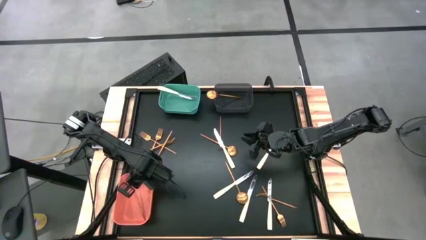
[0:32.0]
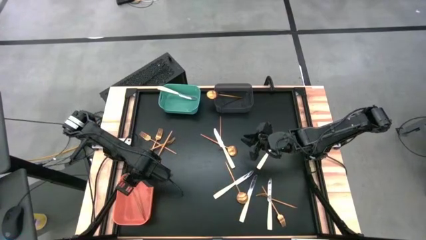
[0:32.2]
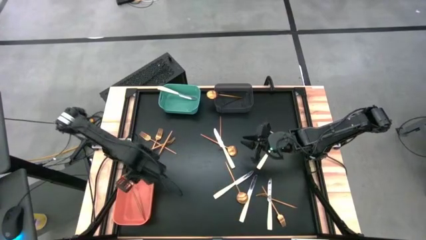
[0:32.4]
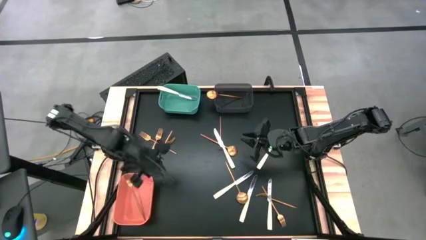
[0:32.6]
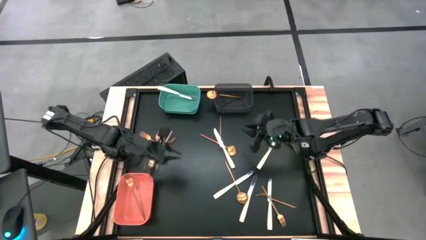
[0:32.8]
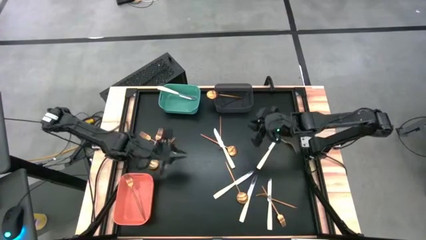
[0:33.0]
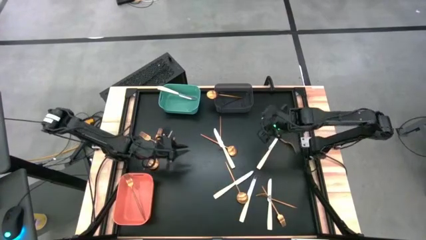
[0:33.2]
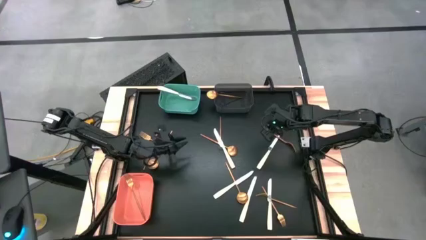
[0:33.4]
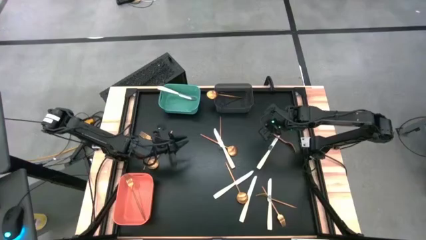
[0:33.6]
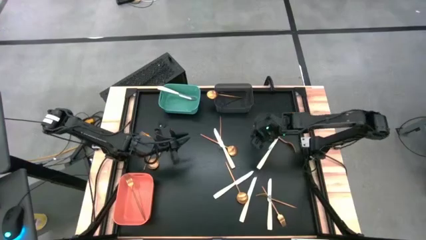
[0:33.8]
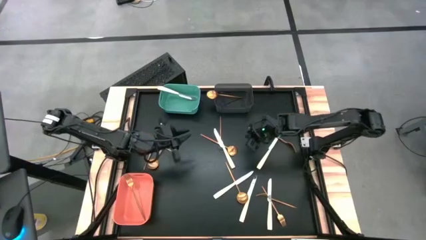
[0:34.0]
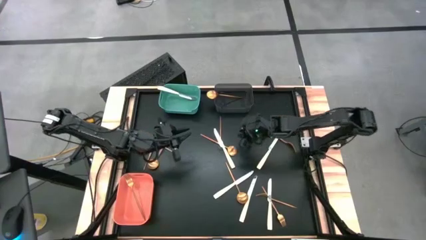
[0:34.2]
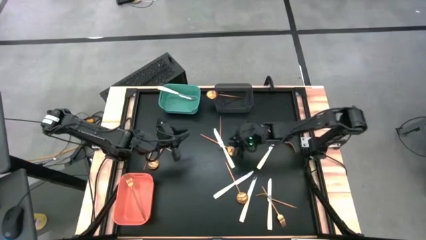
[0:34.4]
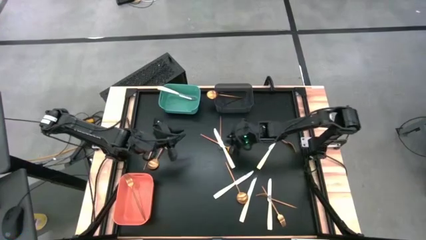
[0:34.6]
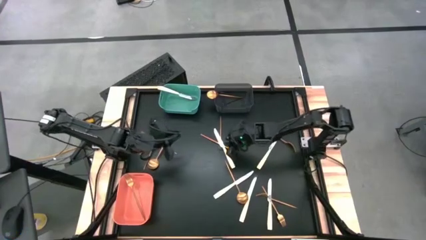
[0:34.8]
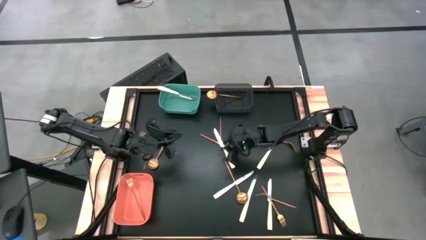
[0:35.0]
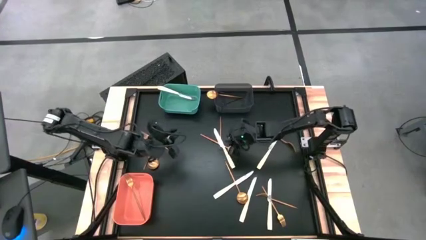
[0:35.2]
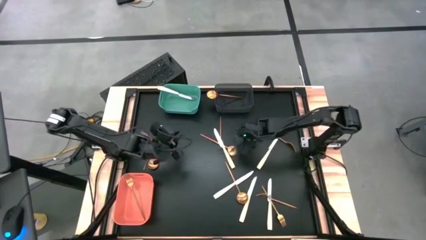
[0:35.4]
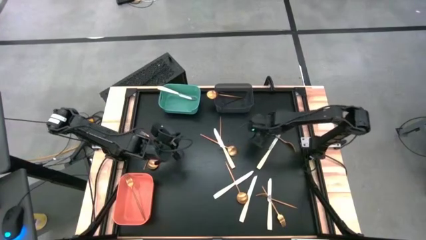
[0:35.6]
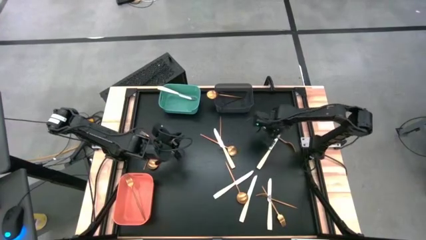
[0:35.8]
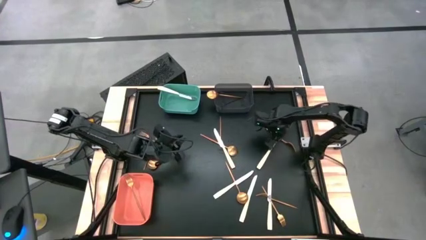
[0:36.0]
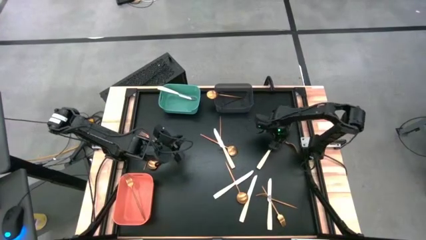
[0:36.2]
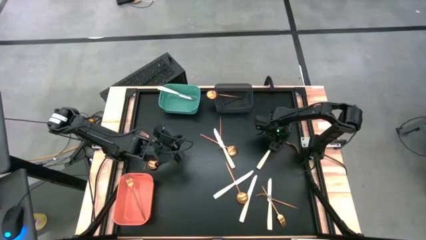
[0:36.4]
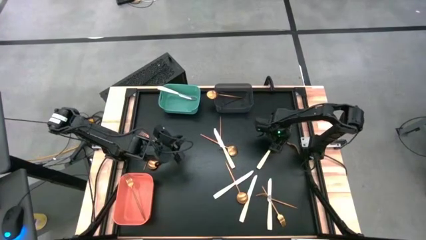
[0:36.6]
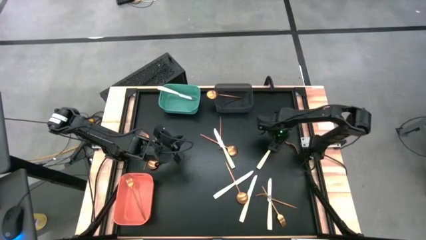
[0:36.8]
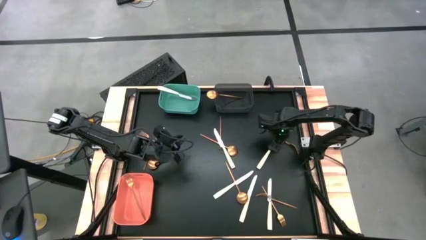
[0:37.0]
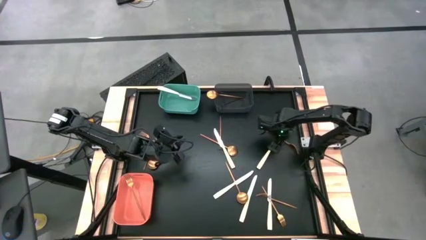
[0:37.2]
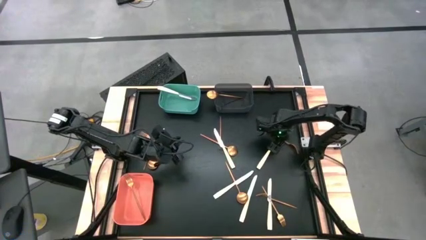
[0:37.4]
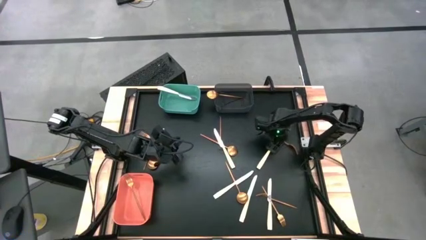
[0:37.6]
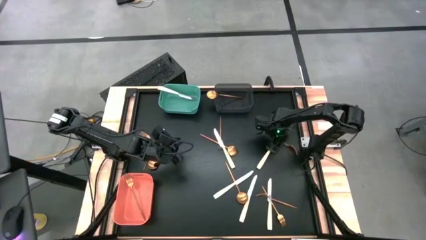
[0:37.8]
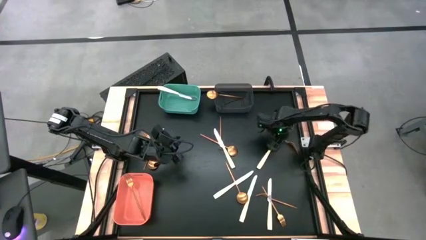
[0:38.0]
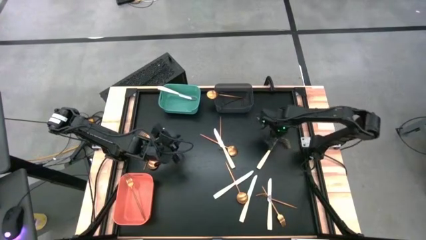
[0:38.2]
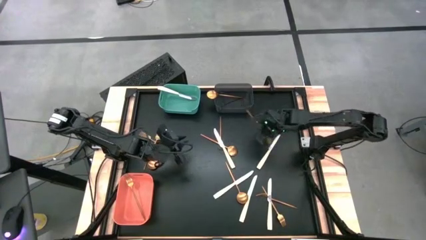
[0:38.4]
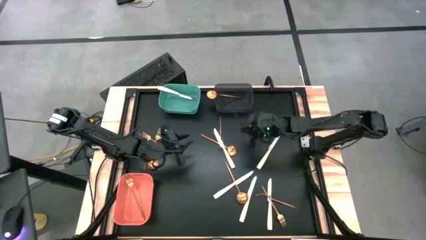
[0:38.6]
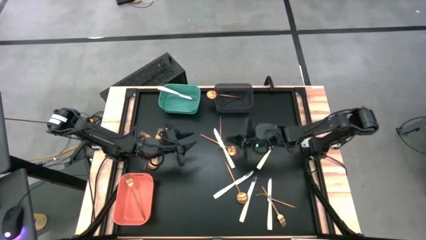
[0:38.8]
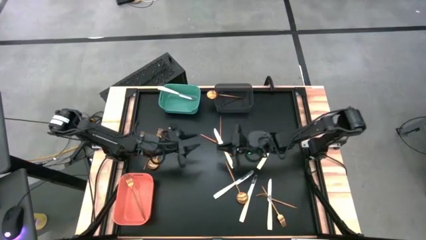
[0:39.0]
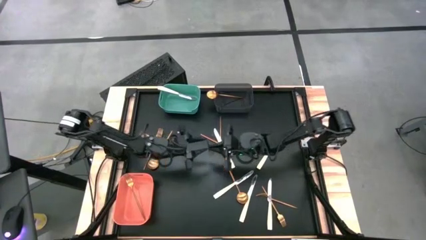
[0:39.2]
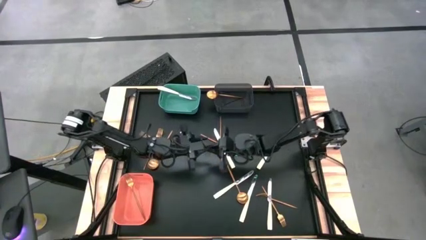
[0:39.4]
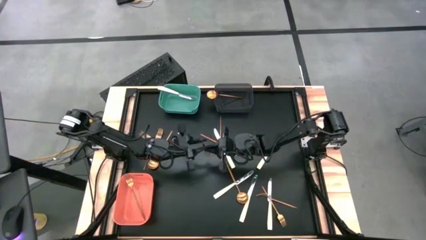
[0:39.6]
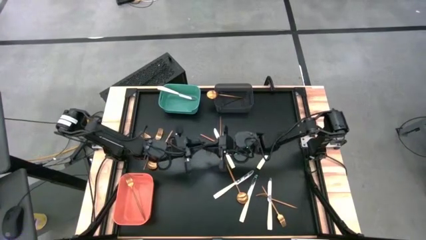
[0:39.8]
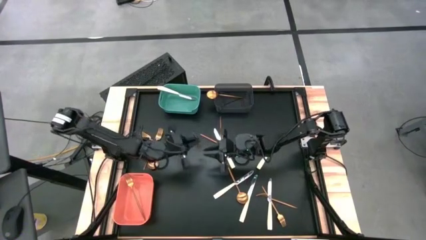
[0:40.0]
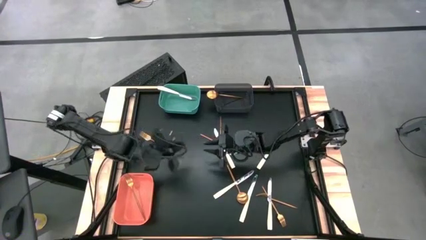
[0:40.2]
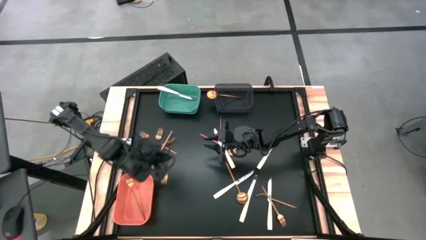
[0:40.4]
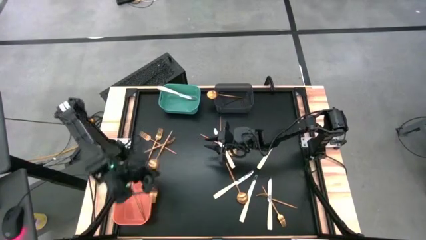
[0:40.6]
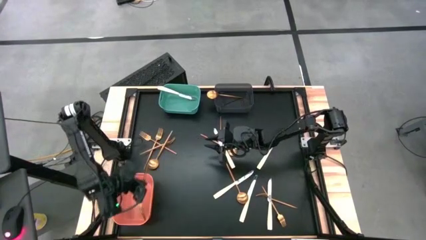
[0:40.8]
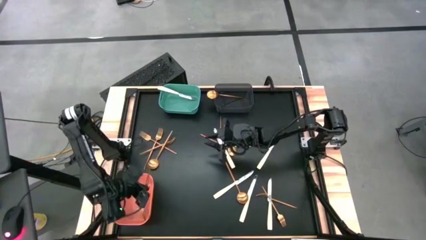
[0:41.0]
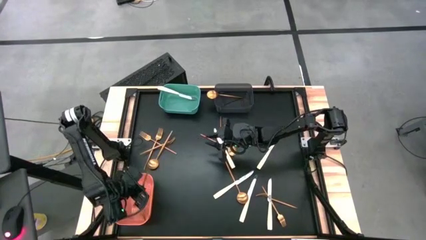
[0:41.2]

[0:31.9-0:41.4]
Task: Sort silverware by color (type)
Put the gold fork into the orange bin

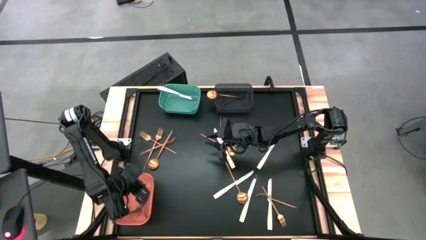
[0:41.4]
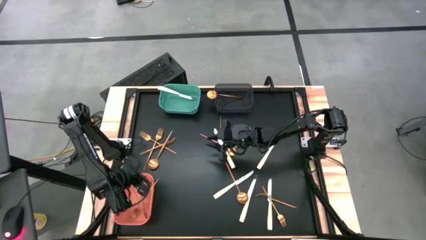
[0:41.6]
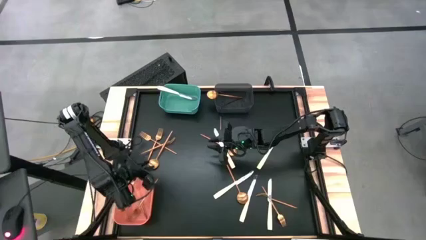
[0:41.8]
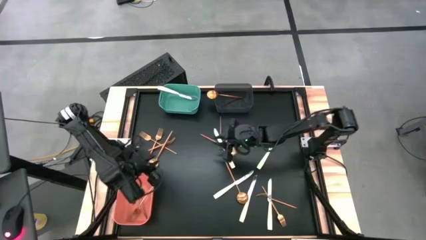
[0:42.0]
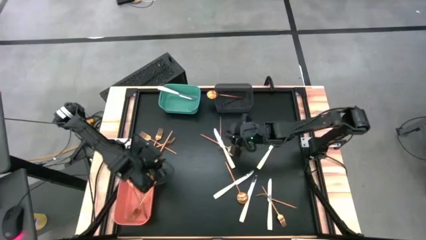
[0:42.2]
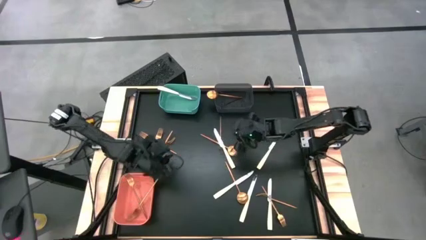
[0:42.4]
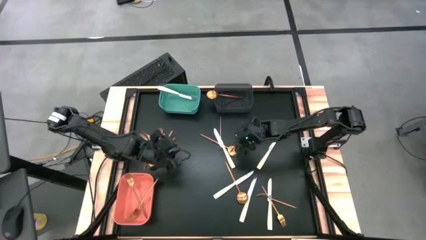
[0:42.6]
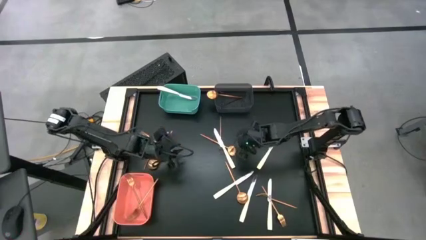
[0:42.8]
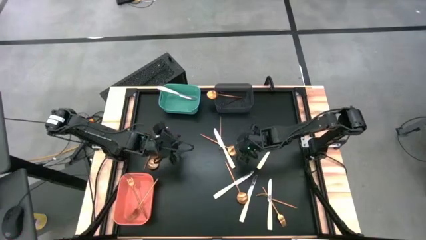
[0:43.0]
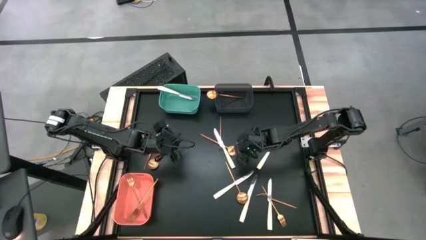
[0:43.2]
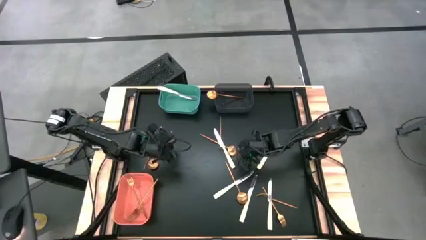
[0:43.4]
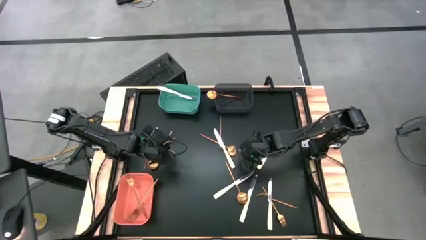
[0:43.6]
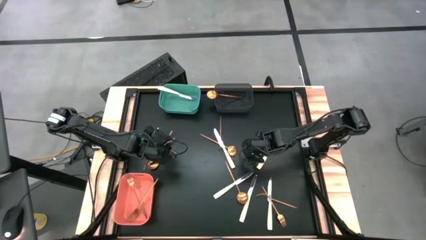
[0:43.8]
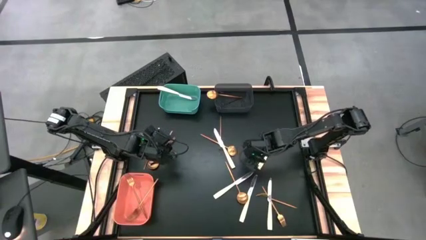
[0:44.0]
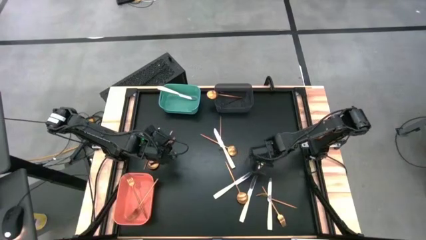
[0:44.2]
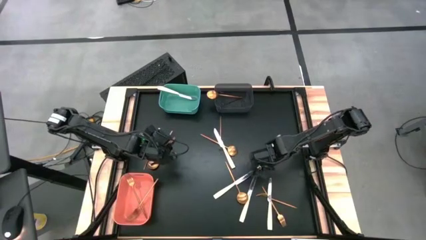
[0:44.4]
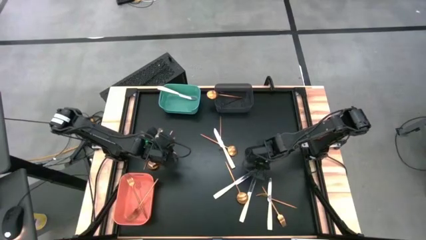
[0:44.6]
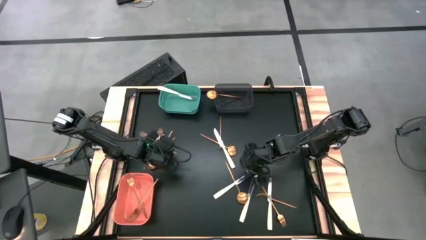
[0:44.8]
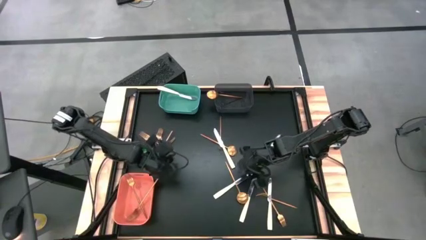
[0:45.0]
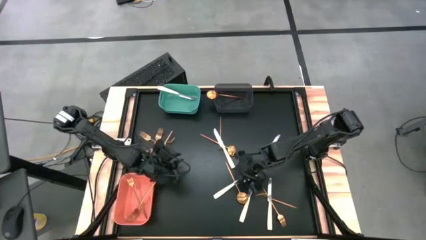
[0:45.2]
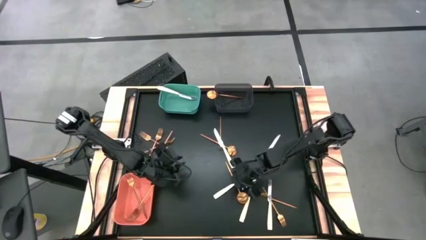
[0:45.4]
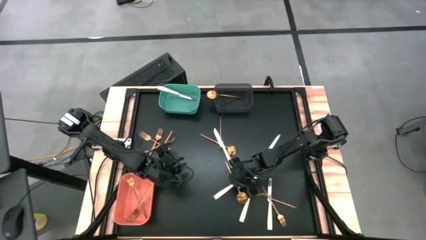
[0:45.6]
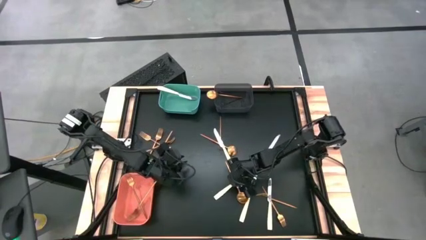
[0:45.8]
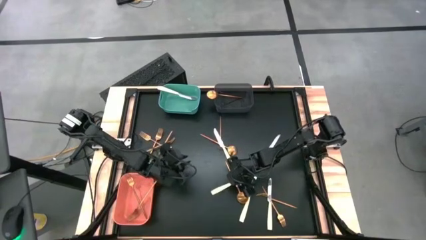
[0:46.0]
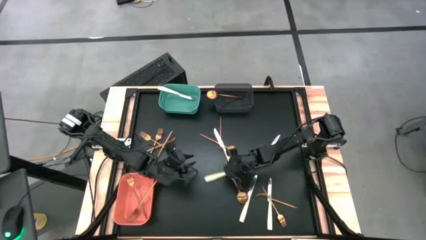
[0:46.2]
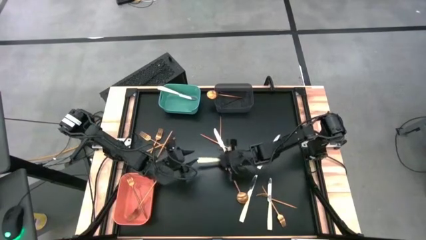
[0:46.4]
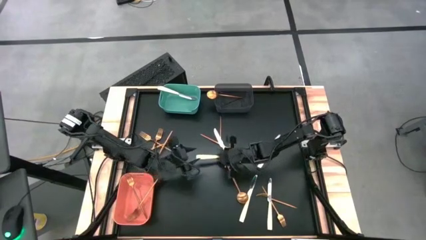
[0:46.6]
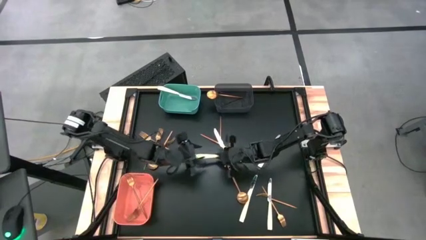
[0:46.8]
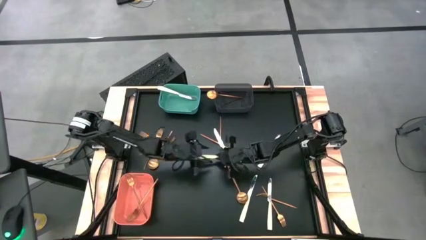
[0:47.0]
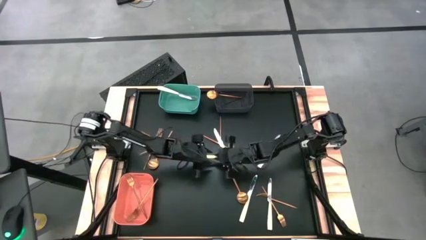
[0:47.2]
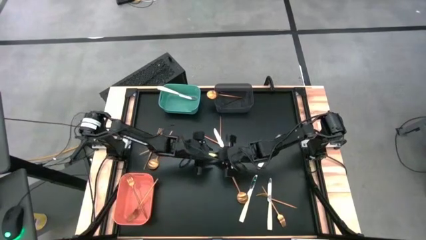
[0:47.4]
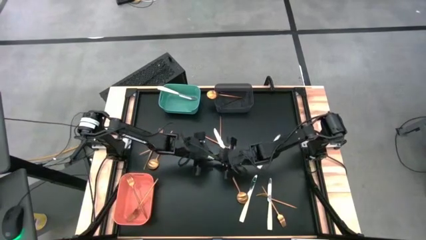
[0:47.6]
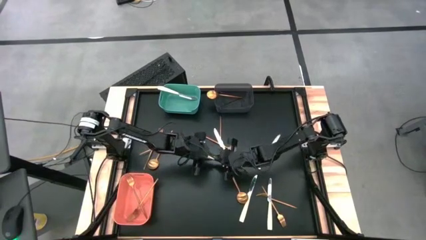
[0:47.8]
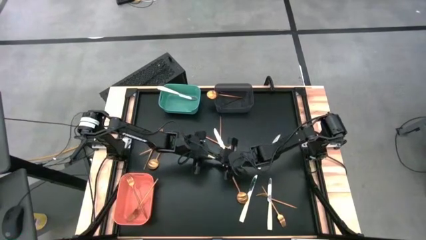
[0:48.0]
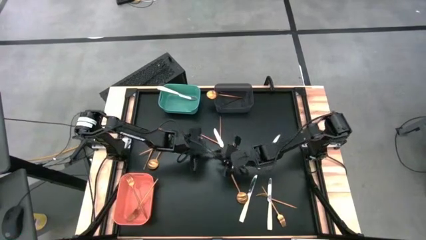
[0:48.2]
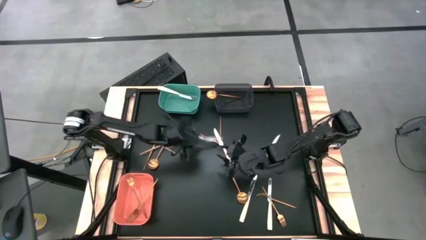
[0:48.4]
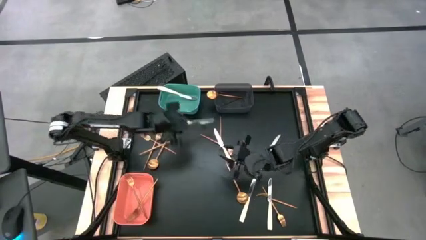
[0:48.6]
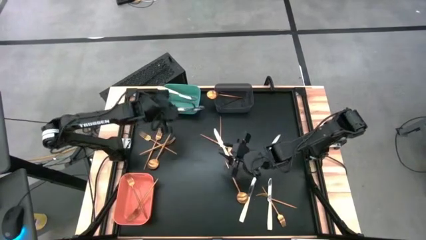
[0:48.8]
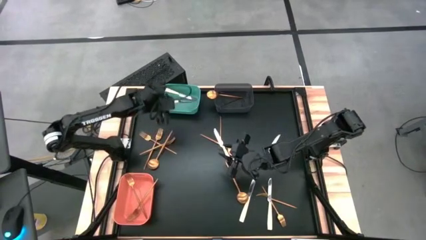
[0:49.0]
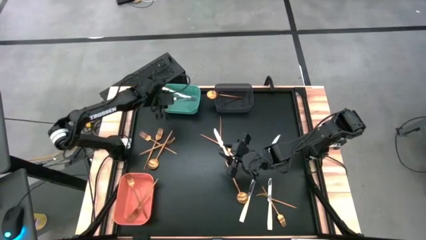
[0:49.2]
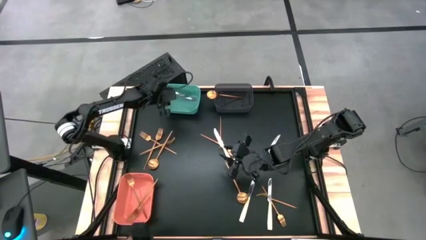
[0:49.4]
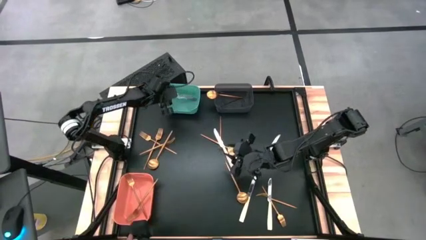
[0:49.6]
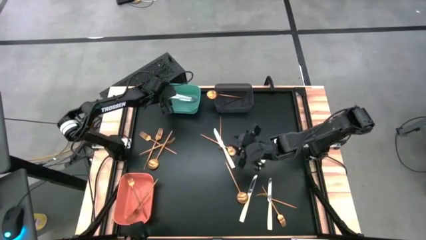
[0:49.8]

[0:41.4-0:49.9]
Put the silver knife into the light blue bin
